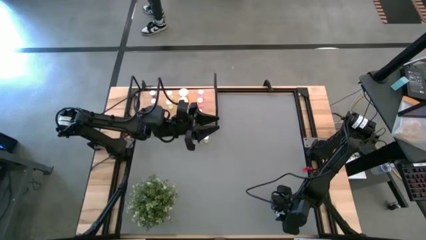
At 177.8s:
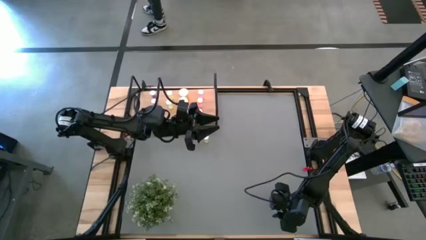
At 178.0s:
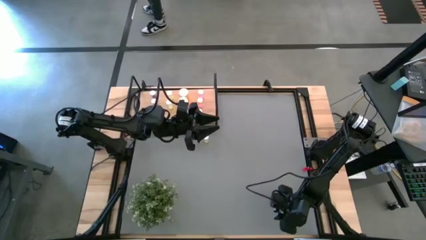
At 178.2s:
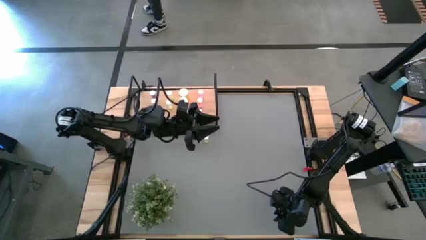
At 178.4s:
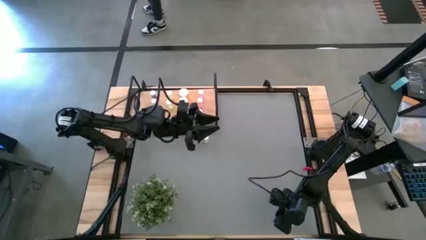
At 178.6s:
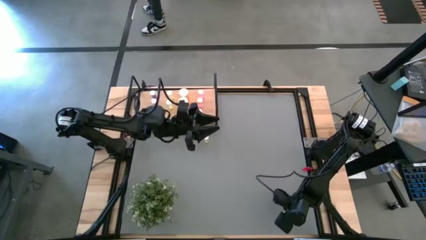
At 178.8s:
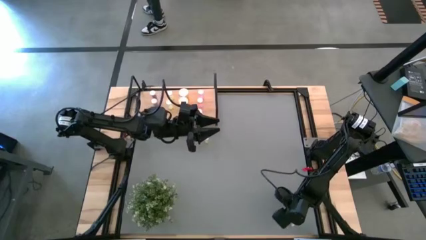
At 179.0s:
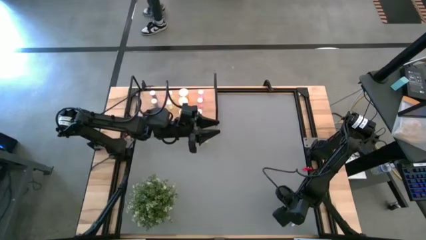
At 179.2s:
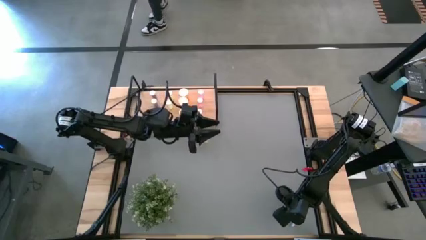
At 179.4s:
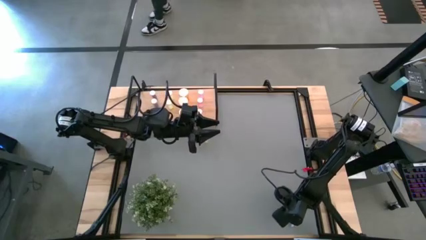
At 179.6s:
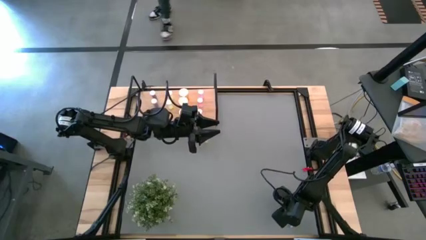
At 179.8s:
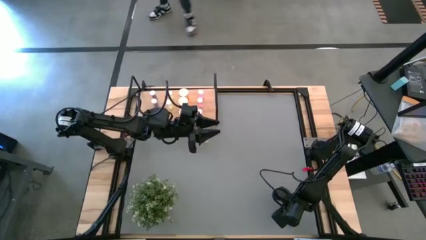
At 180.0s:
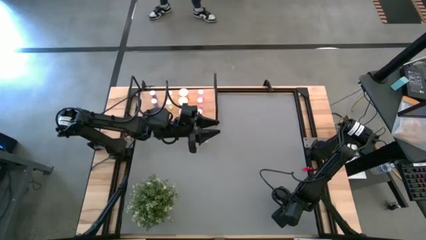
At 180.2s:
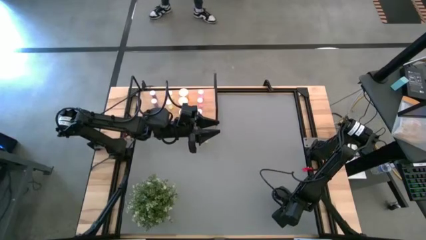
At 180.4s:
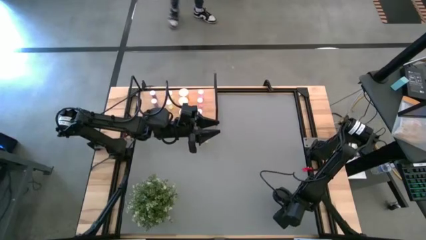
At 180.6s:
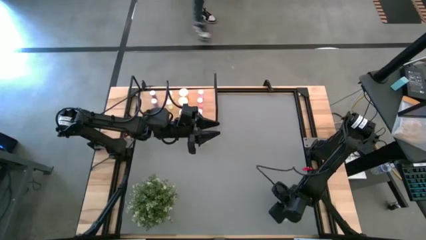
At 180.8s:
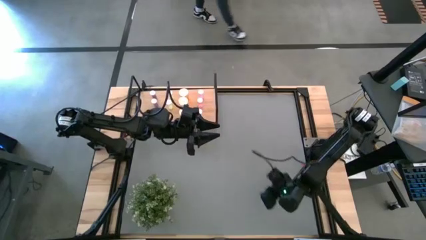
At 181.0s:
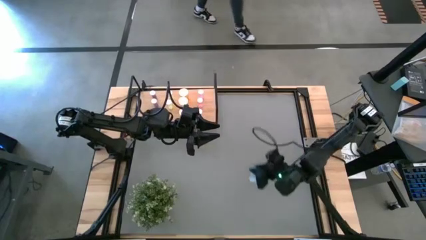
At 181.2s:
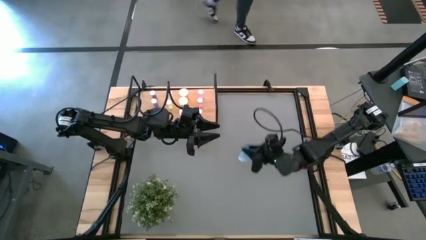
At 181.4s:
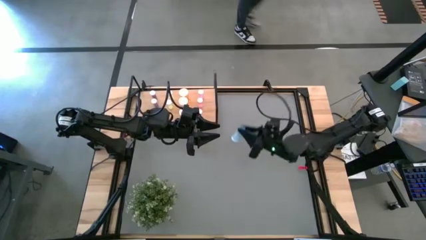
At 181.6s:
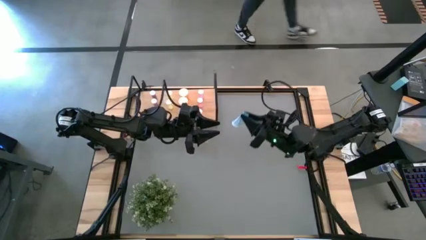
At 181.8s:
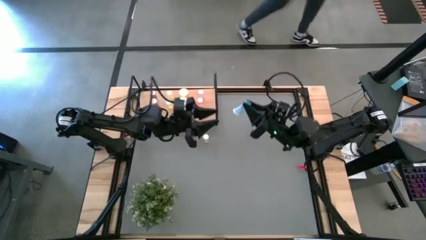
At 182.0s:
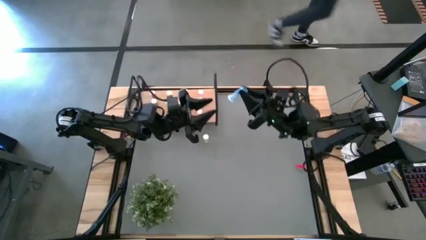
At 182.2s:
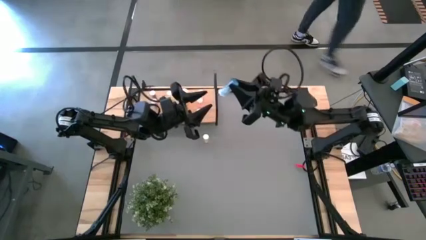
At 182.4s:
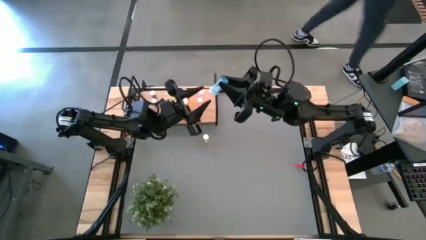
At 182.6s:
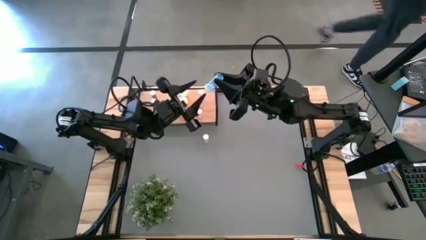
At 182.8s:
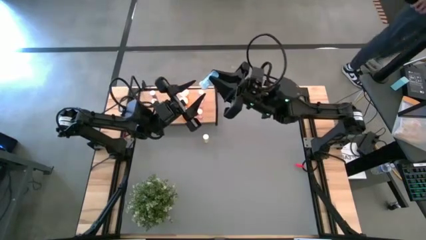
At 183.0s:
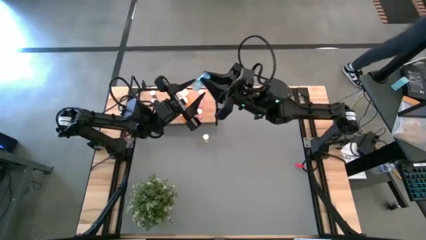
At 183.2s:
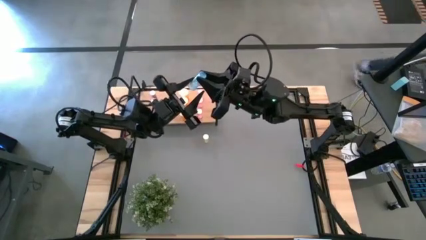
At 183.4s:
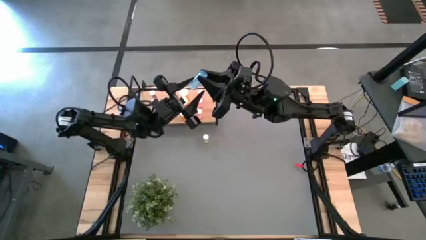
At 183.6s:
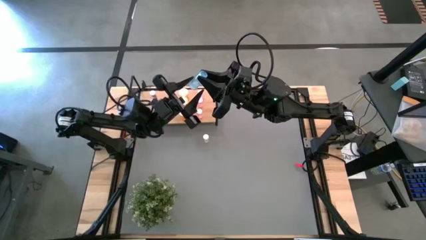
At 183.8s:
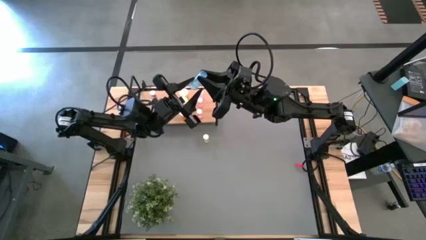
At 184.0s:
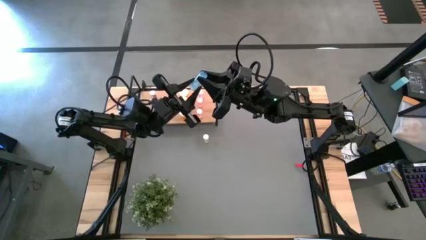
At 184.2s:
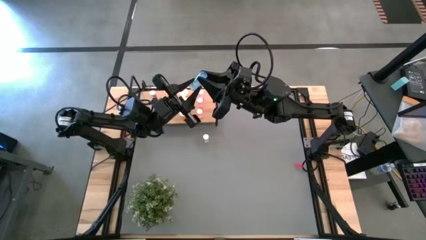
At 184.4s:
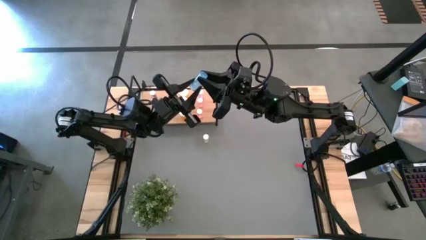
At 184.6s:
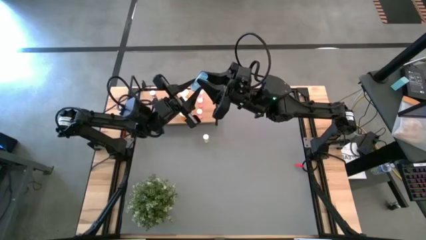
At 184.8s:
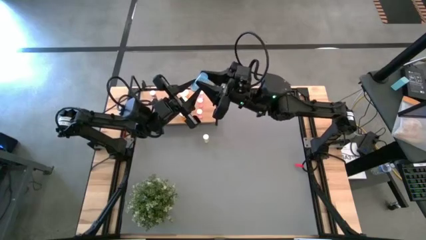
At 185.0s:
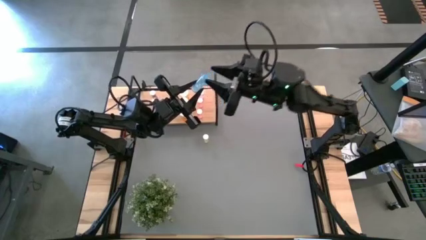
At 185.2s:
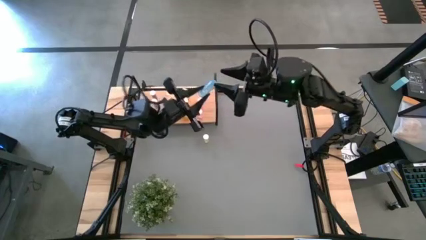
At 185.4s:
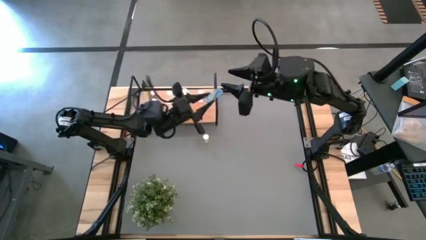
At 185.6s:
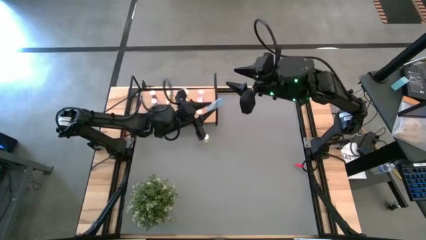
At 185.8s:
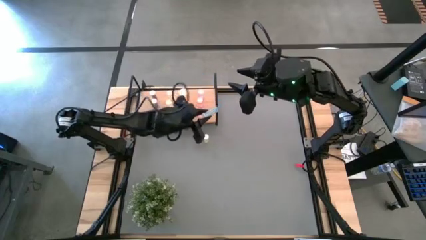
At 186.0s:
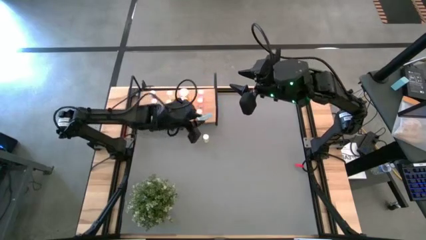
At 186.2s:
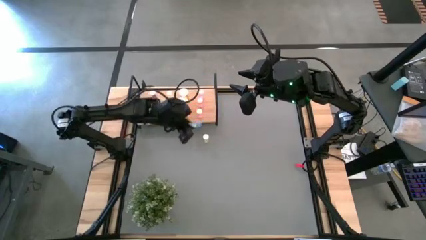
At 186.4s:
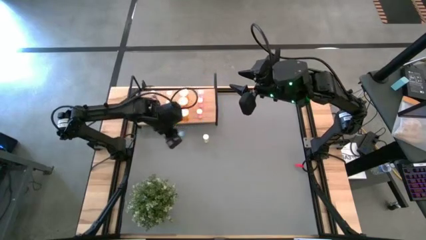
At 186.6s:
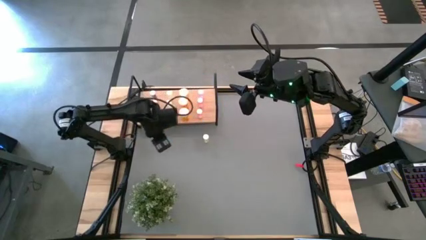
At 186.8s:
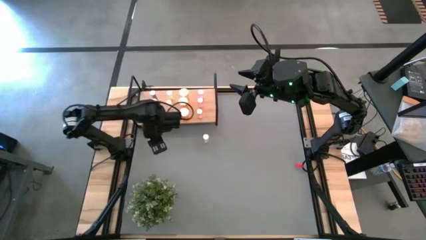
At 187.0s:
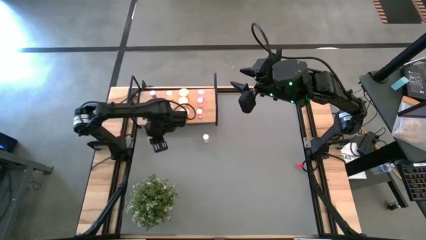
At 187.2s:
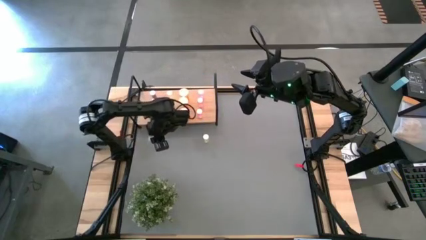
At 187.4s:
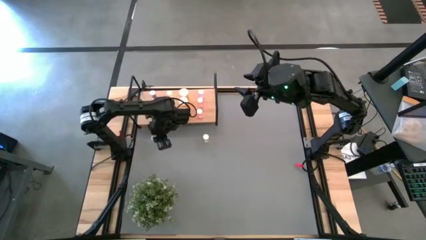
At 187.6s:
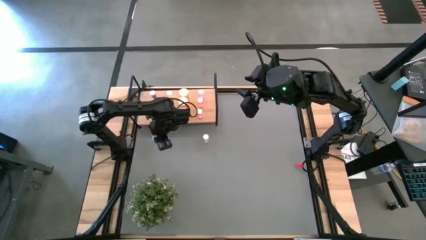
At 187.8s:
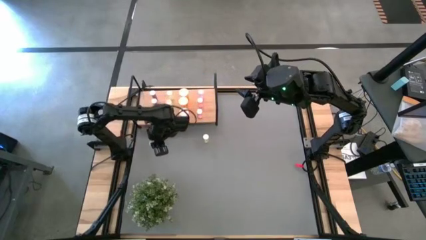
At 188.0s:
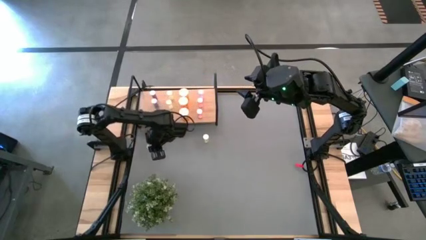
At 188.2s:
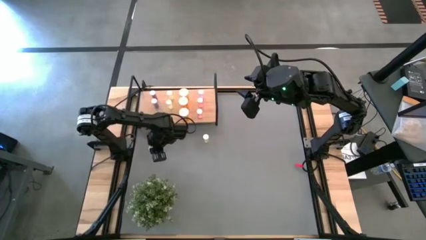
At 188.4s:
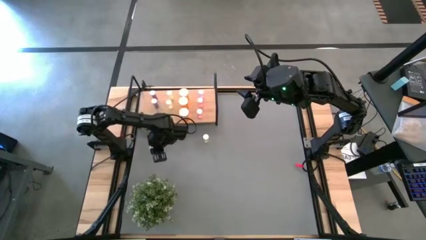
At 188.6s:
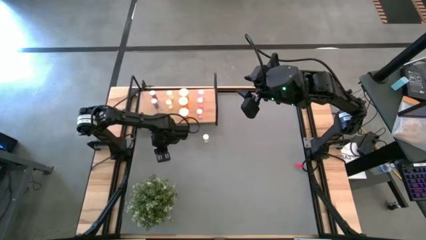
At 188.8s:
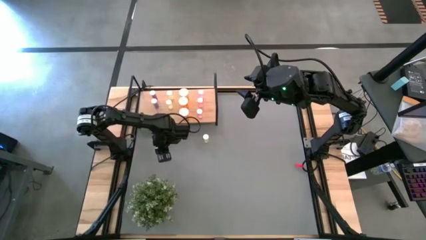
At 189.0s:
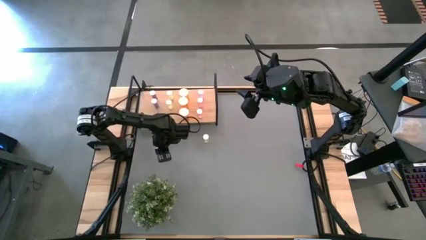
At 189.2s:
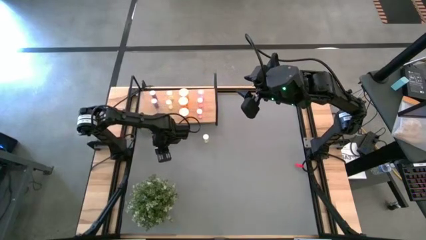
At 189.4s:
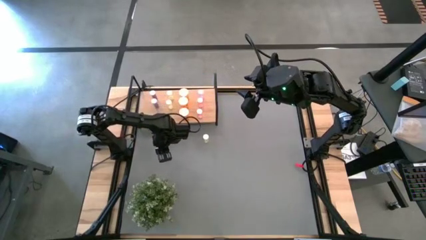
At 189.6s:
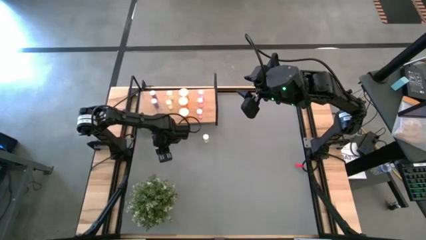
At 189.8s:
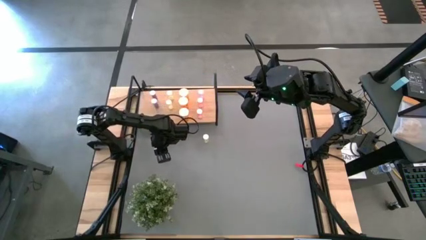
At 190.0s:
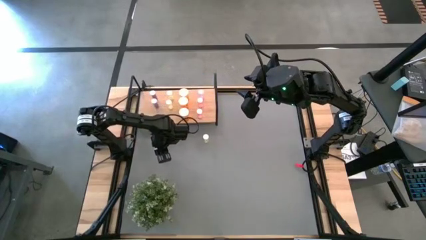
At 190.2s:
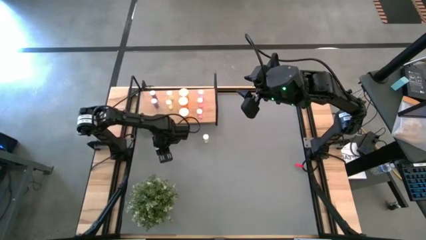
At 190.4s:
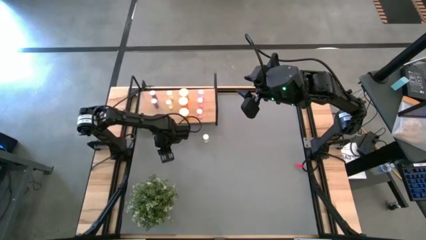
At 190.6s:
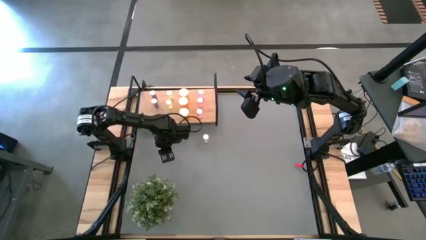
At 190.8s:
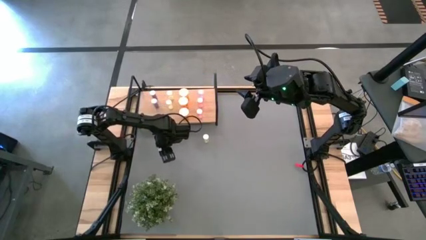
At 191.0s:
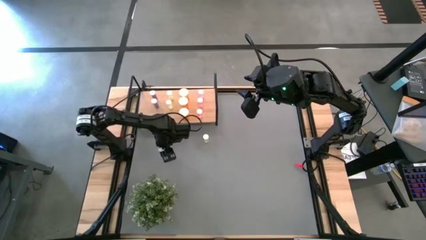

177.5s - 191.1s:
Task: Pick and place medicine bottles onto shelf by color
Move the blue pill bottle to the middle left of the table
